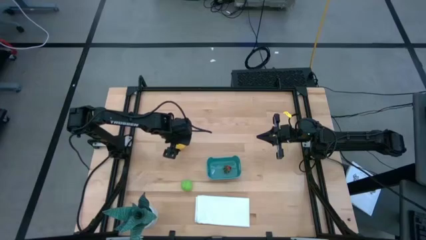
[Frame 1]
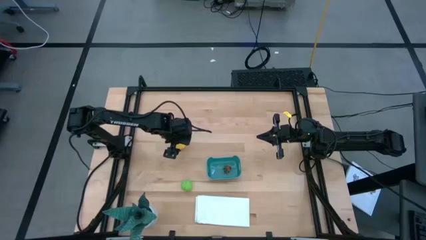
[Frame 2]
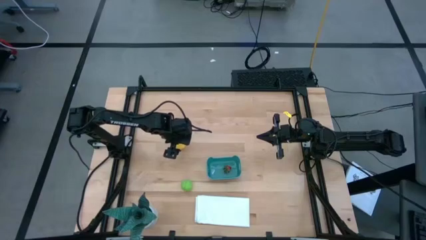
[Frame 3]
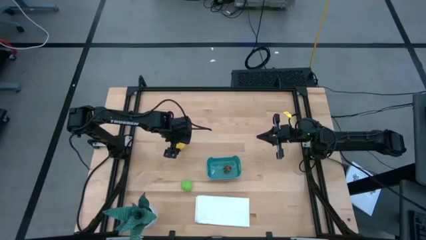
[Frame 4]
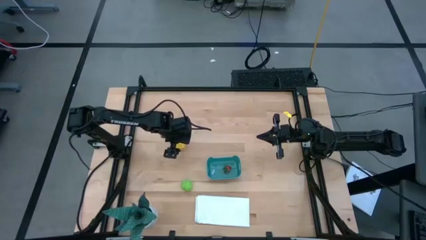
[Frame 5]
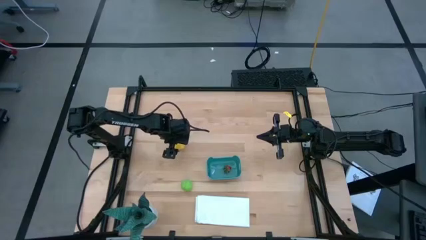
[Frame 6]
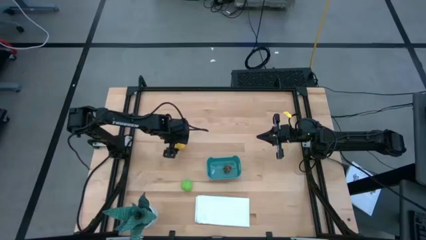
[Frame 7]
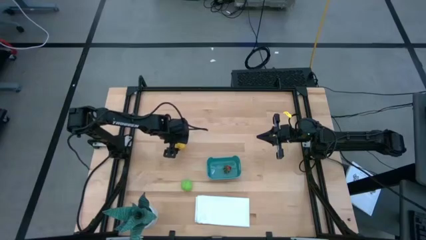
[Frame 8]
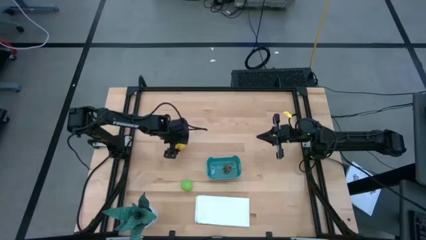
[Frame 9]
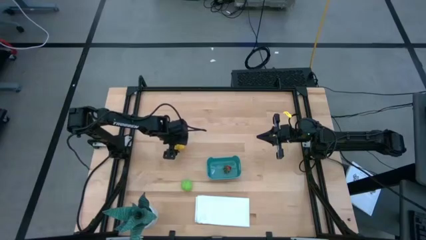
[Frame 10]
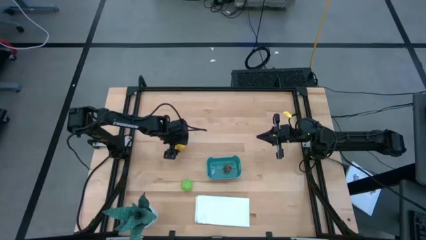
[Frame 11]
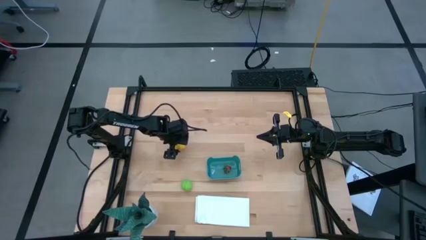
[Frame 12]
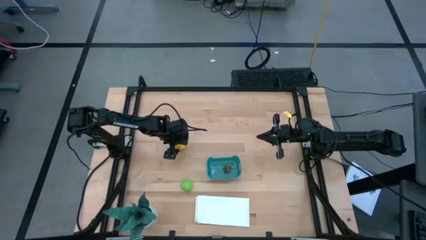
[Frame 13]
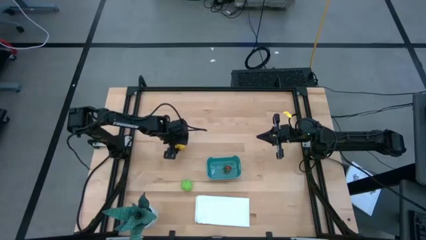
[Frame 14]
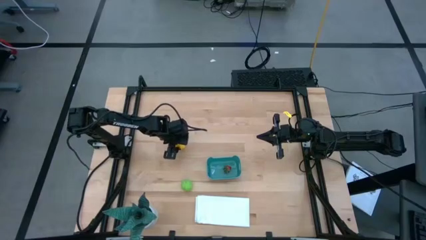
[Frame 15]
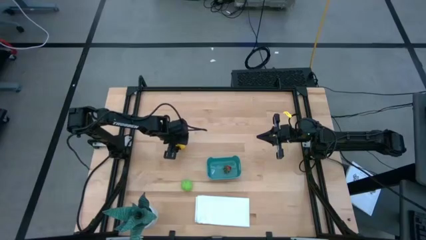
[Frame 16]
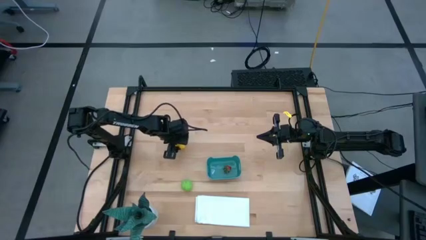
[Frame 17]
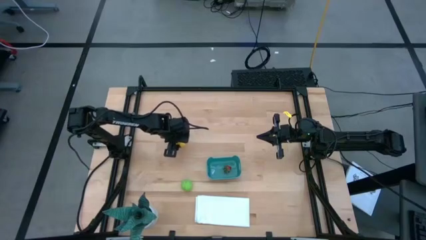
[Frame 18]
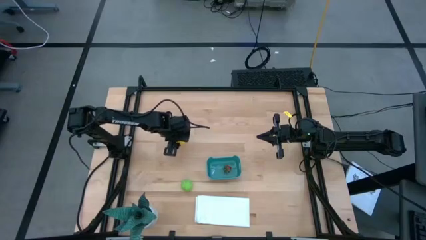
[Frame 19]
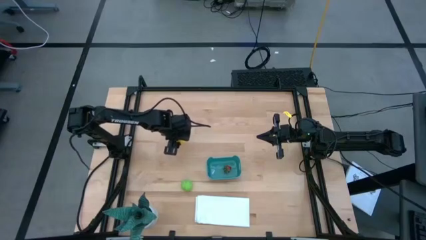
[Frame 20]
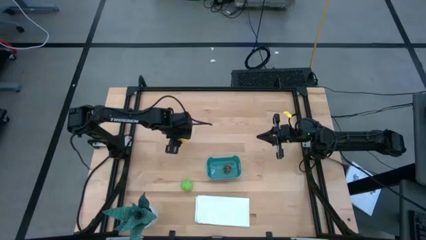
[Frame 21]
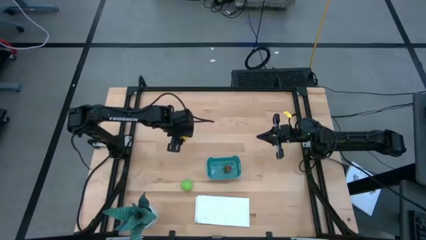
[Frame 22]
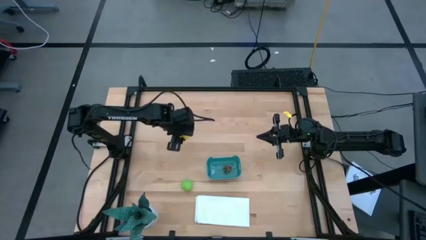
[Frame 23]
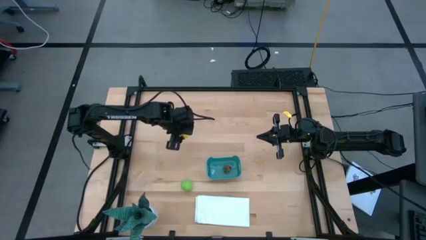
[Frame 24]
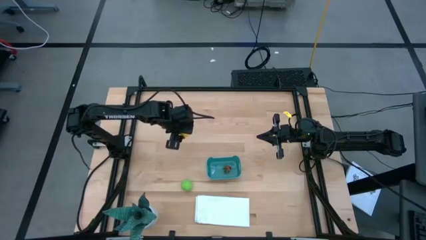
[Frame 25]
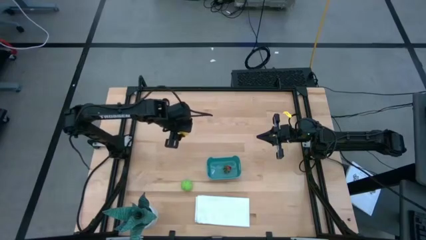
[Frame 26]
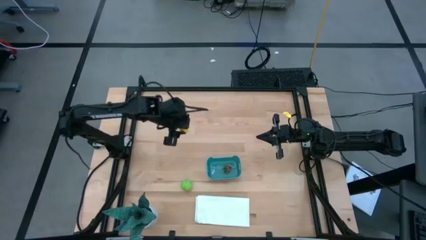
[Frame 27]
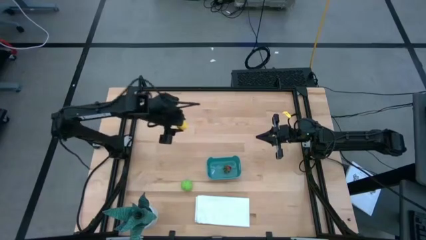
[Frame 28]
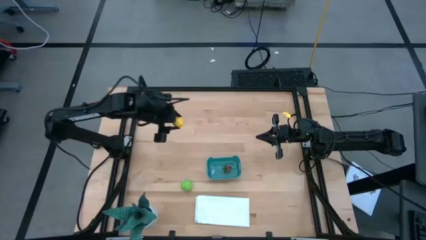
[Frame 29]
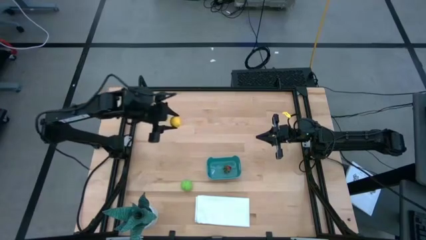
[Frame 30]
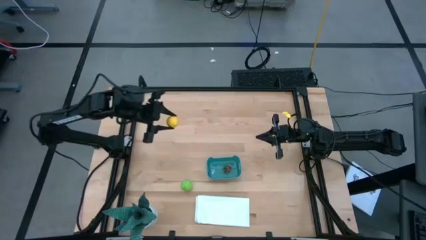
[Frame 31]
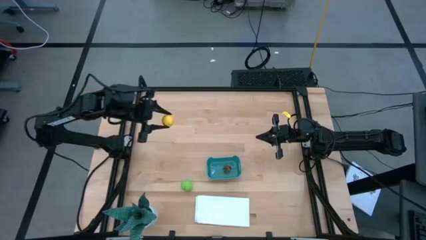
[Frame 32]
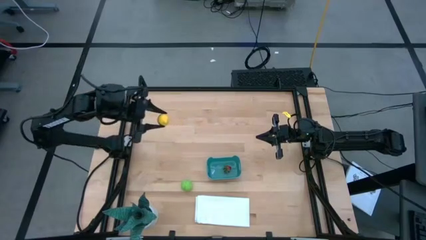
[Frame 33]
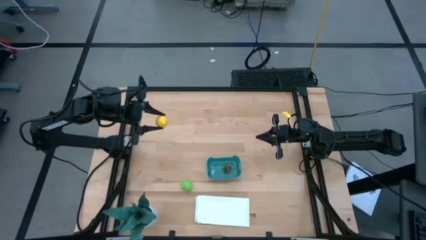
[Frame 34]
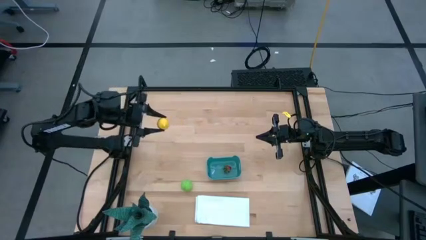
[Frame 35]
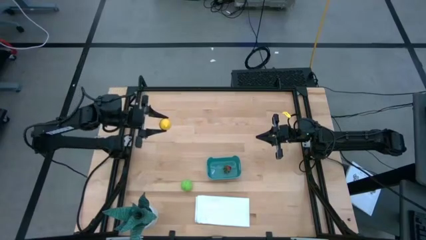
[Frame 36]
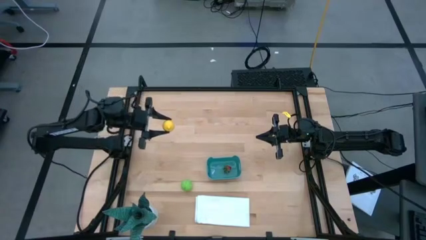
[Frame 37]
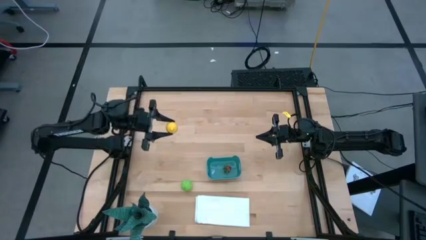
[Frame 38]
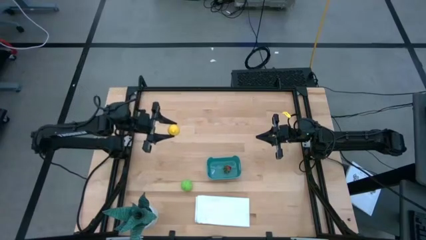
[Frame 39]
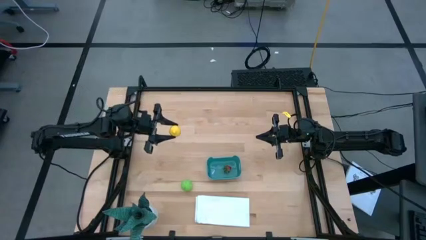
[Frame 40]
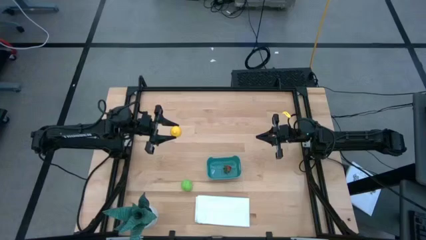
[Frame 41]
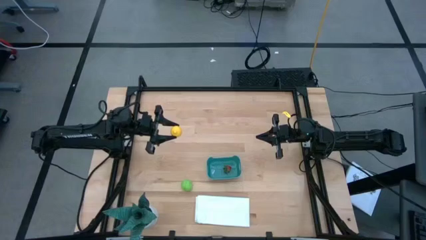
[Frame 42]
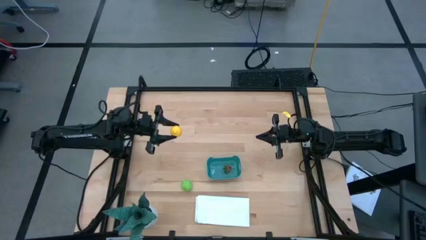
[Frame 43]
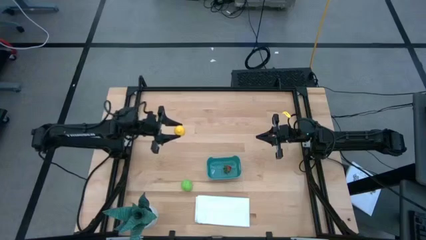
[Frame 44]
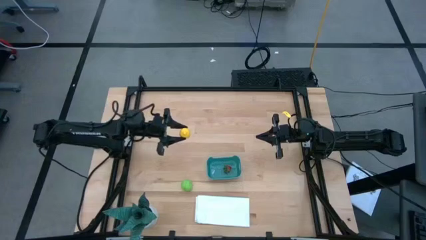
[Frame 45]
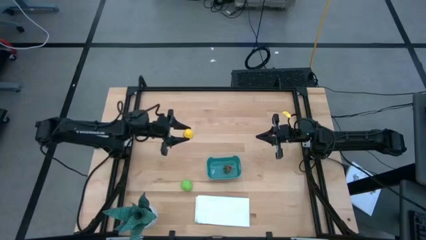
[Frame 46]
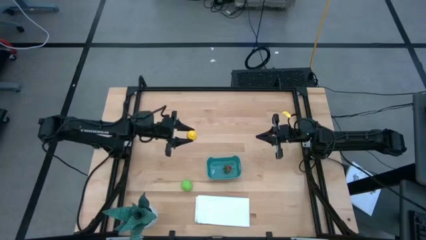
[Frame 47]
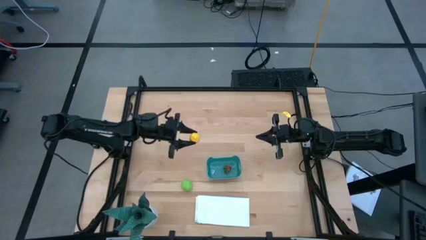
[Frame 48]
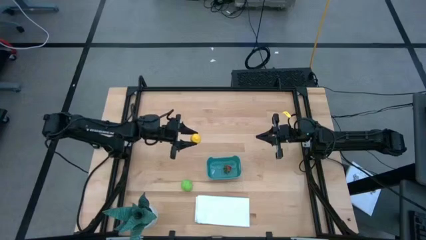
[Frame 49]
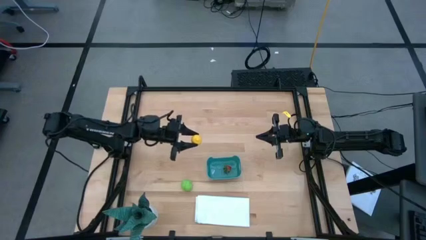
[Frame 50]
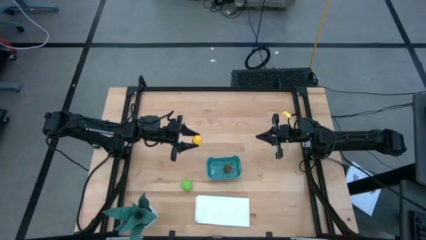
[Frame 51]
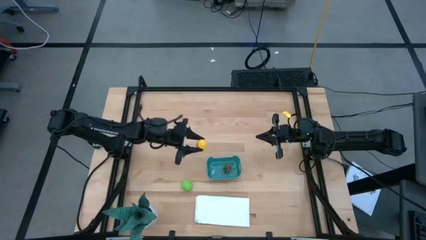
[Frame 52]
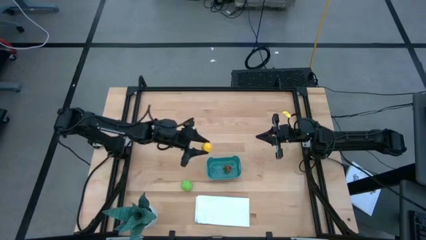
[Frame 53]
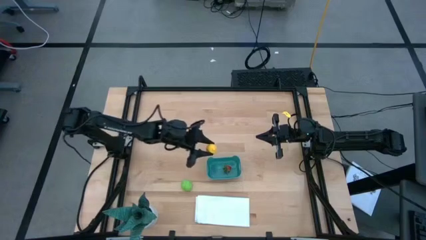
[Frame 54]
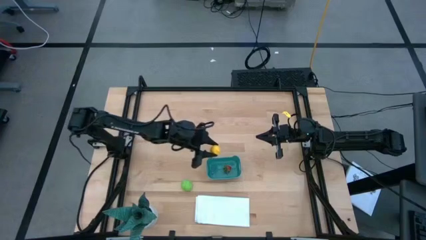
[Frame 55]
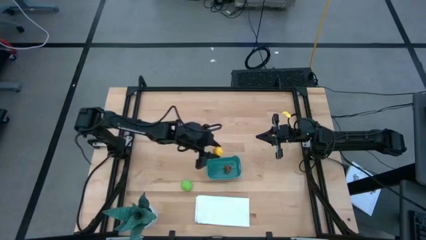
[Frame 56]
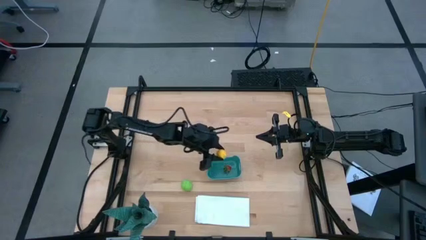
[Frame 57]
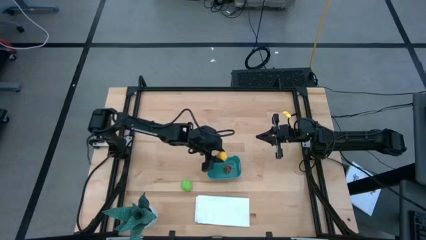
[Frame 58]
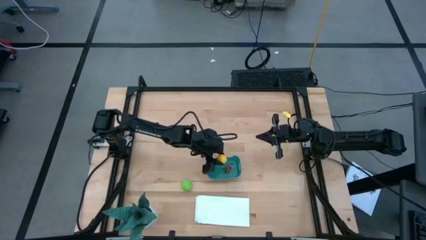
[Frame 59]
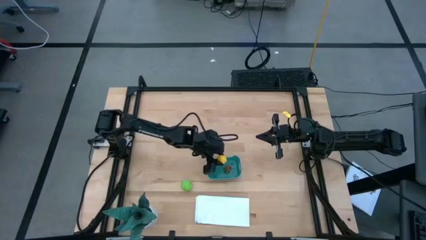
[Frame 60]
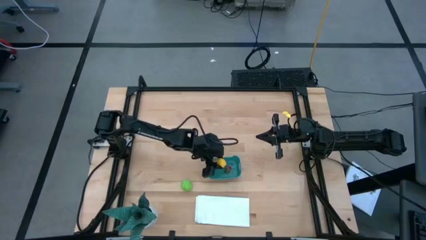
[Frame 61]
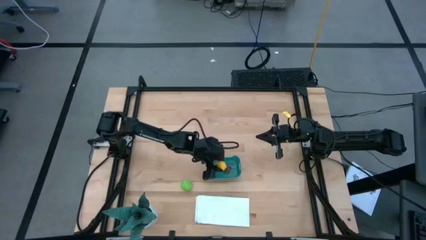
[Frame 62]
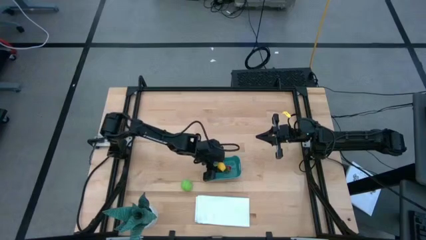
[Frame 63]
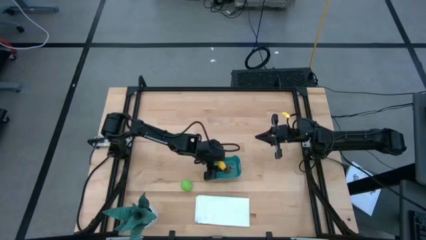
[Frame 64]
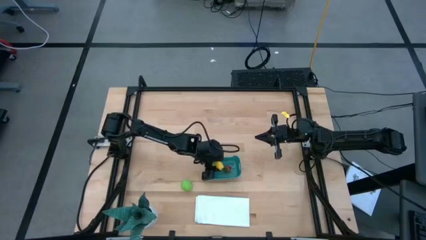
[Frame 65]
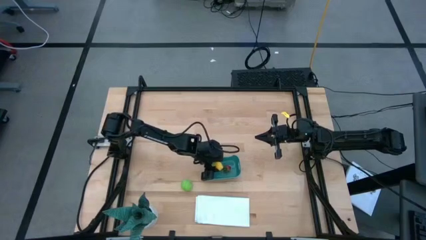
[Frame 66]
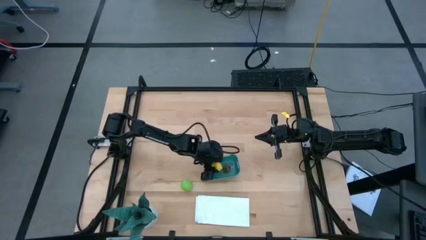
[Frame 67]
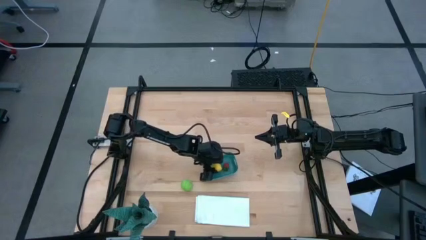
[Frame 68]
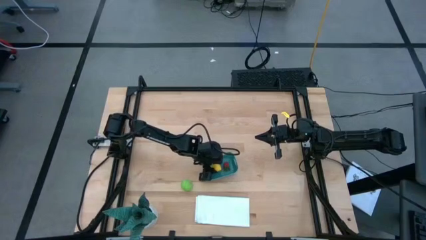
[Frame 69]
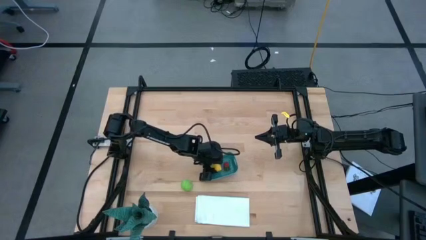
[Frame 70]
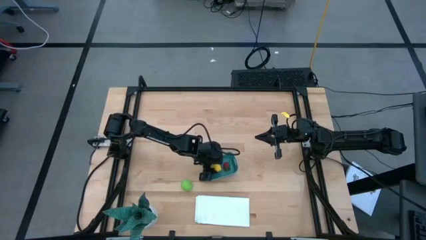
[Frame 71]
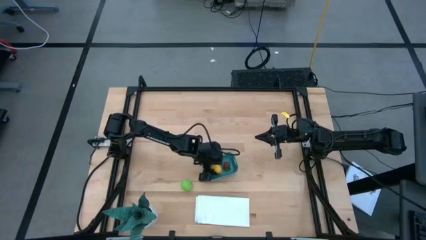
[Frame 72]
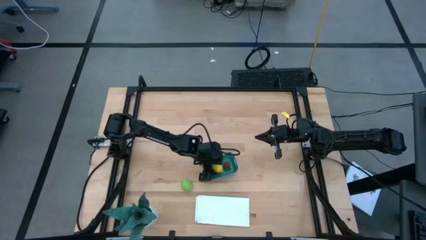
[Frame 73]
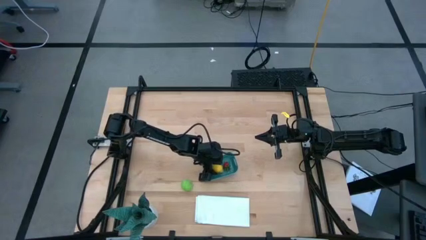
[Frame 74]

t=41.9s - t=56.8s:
Task: Pick and placing Produce into tupperware
Put the lemon into the green bin
